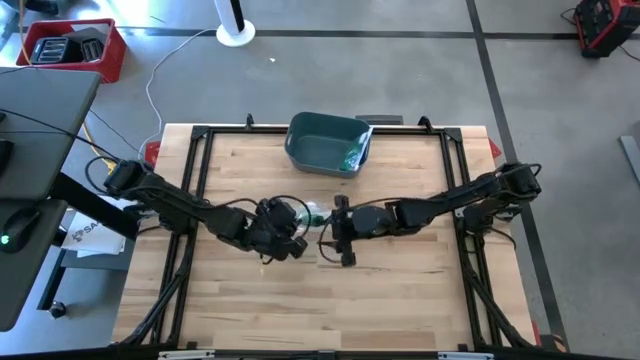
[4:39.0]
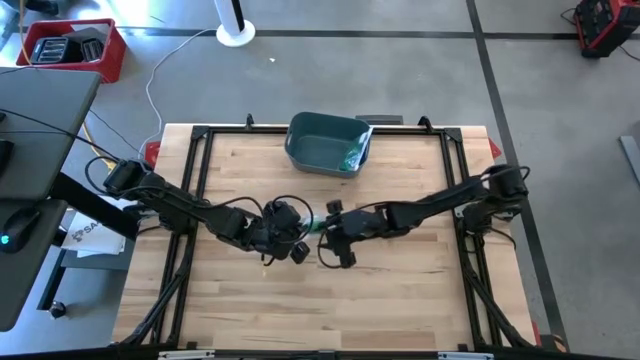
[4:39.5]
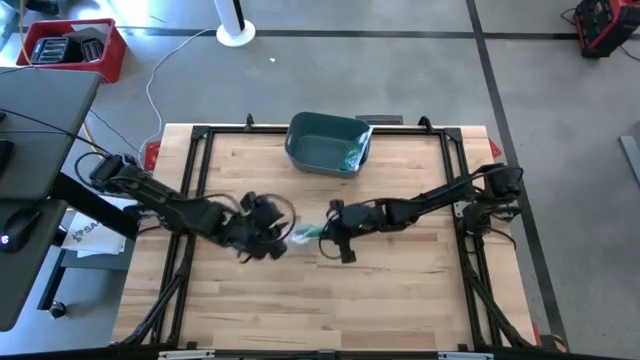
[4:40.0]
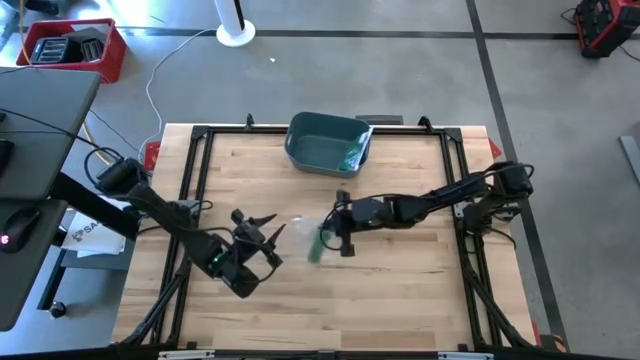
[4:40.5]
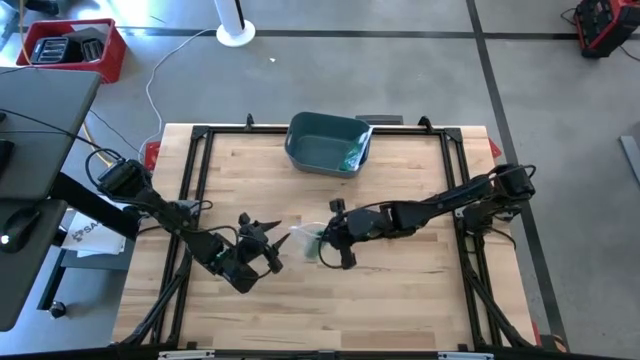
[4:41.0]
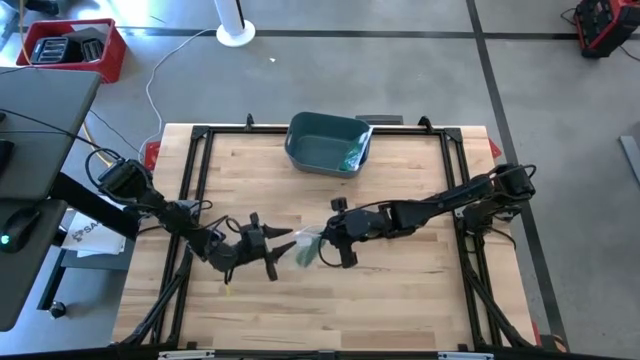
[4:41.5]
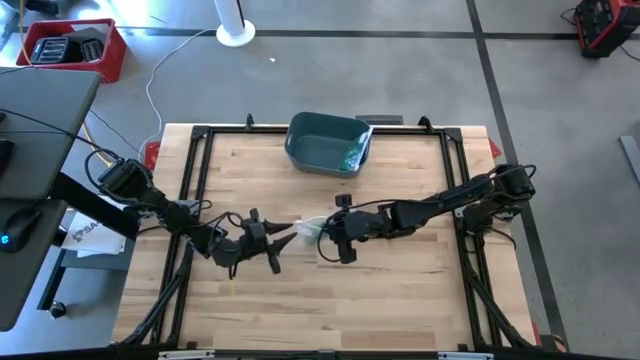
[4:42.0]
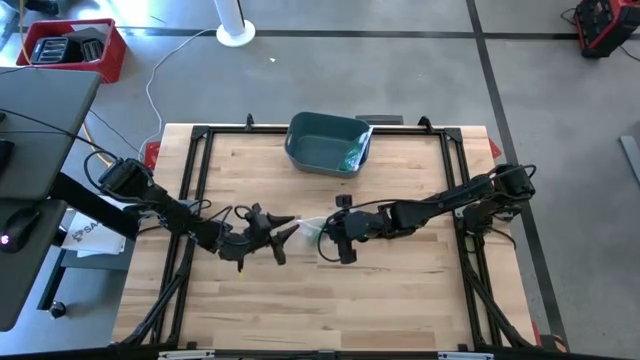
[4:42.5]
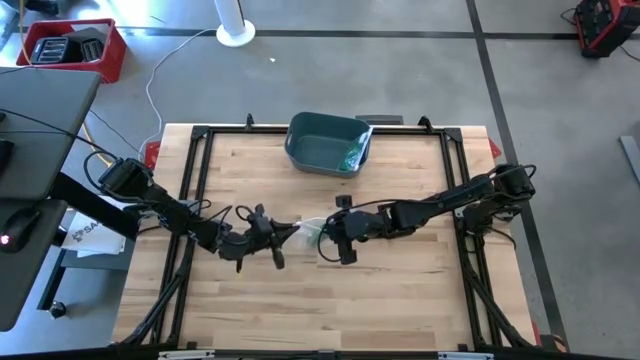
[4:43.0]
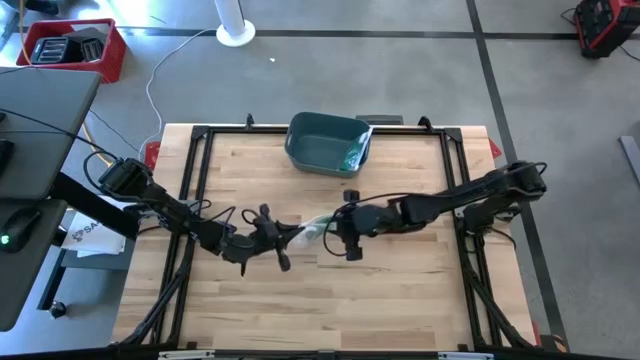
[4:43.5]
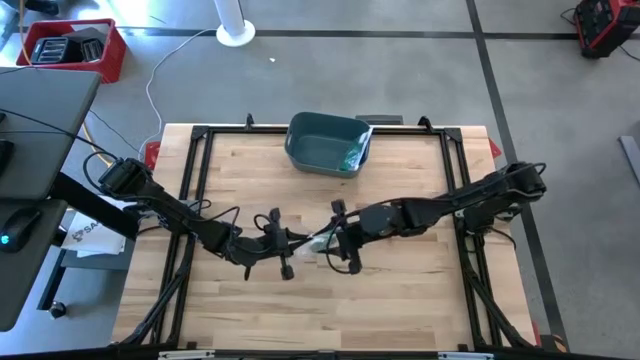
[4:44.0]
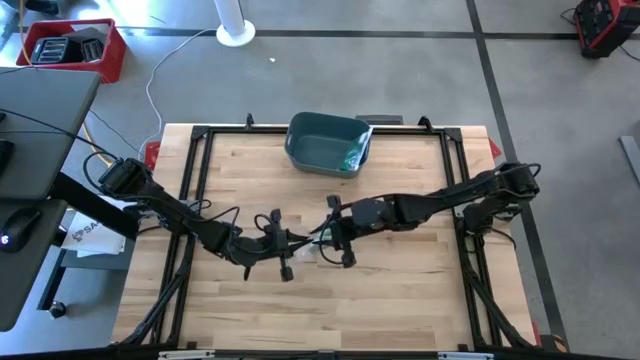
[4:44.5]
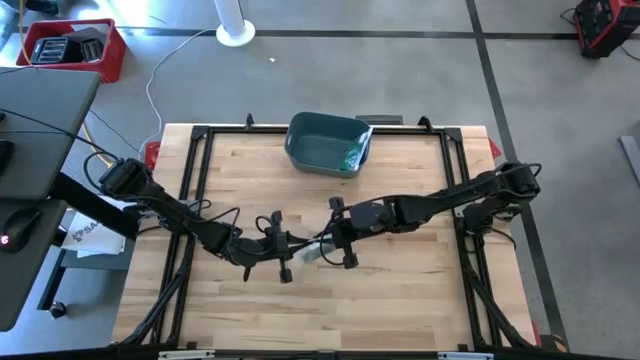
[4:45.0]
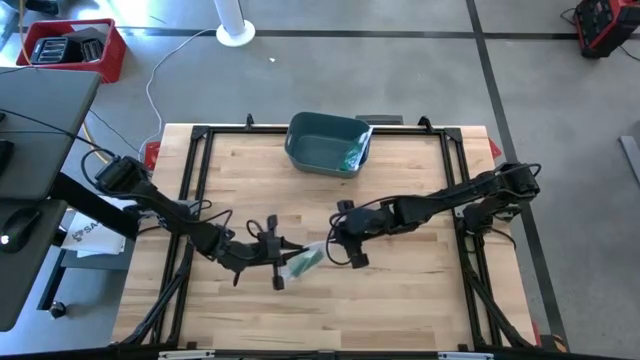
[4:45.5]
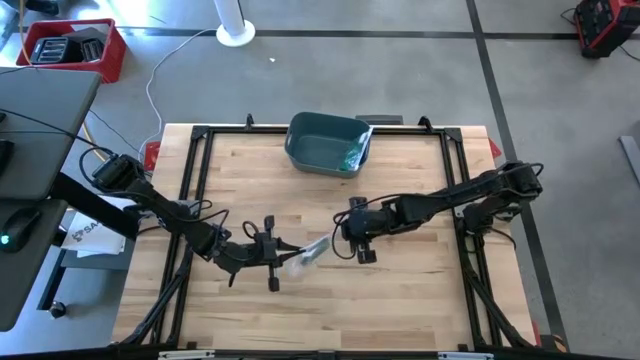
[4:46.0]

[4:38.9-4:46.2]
Task: Roll bandage
Close the transparent zip bag

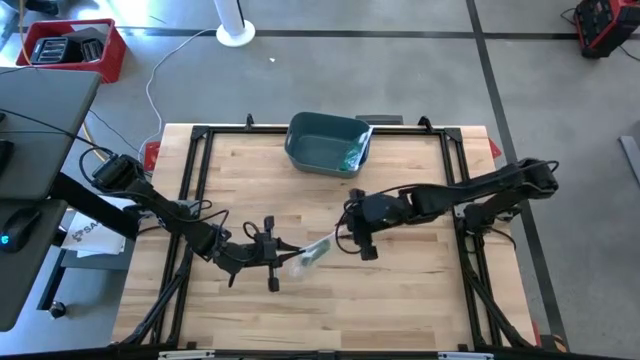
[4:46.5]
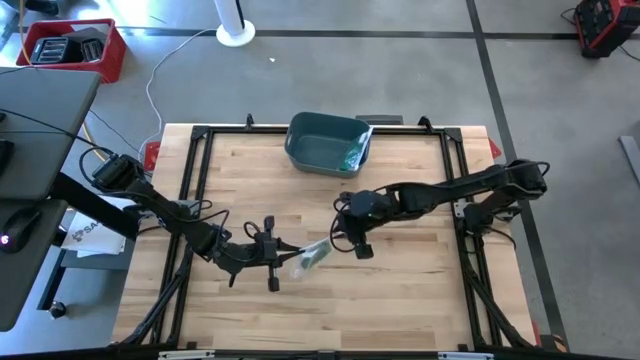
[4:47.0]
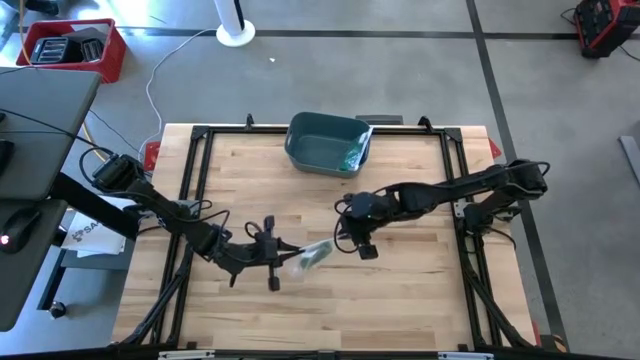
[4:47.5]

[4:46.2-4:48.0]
Close the transparent zip bag

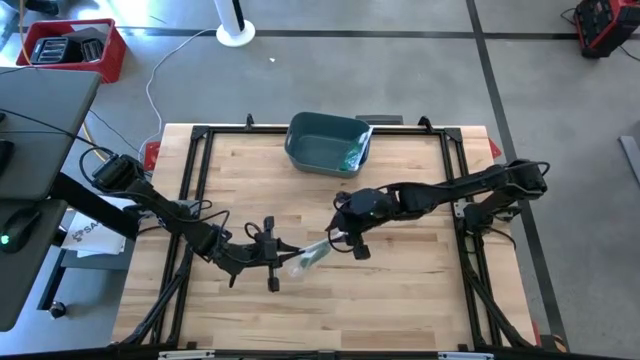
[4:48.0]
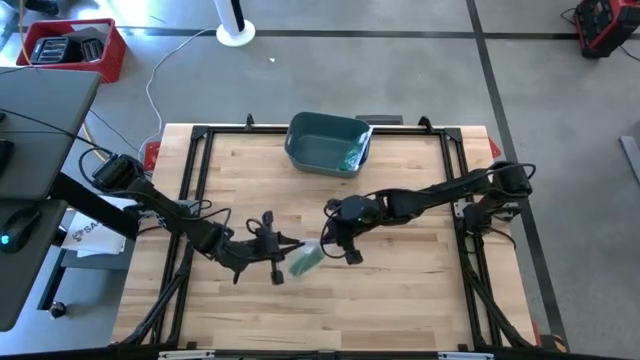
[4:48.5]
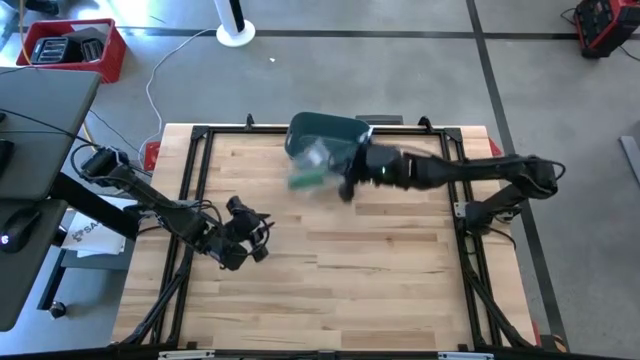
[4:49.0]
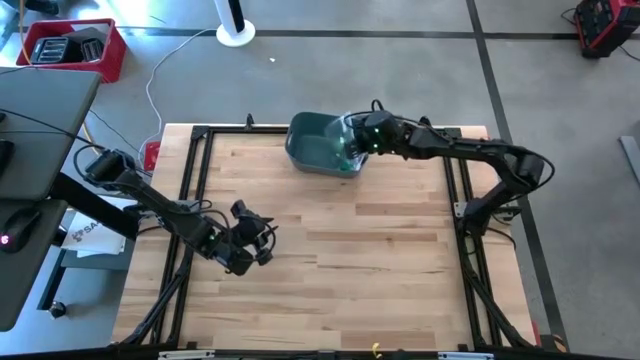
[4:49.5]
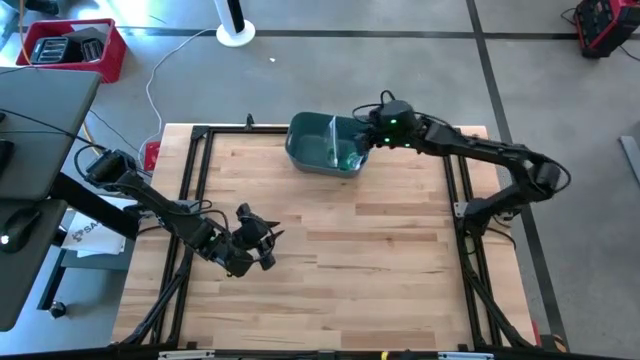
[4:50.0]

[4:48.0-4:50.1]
Put the transparent zip bag into the blue bin

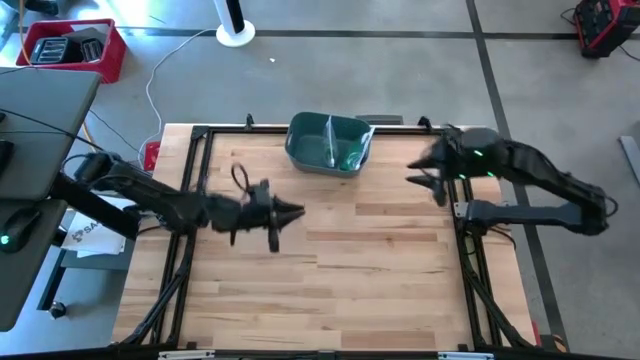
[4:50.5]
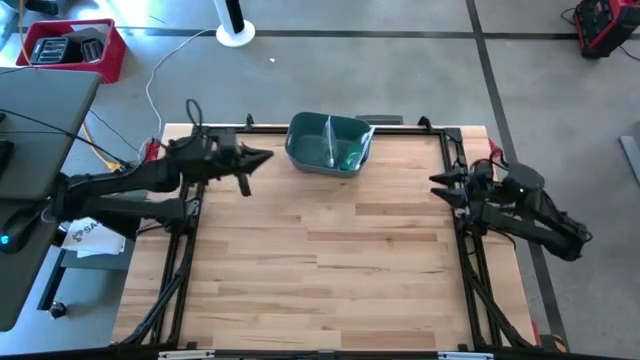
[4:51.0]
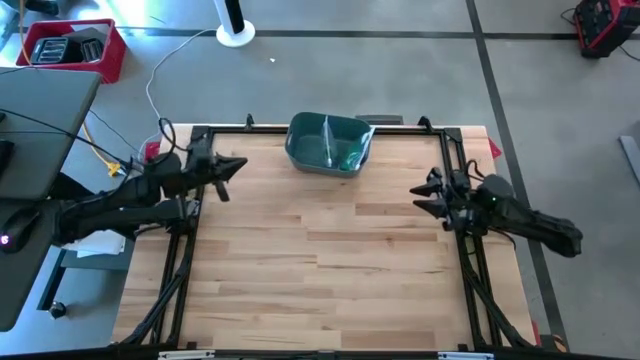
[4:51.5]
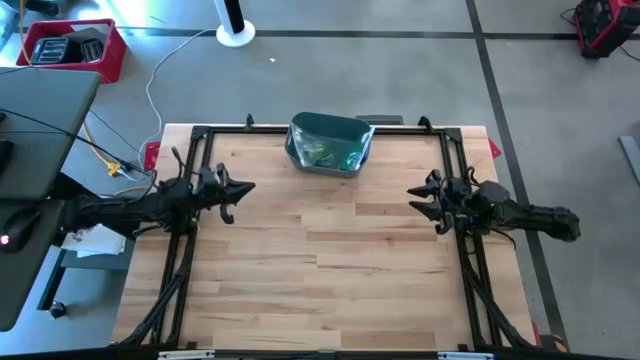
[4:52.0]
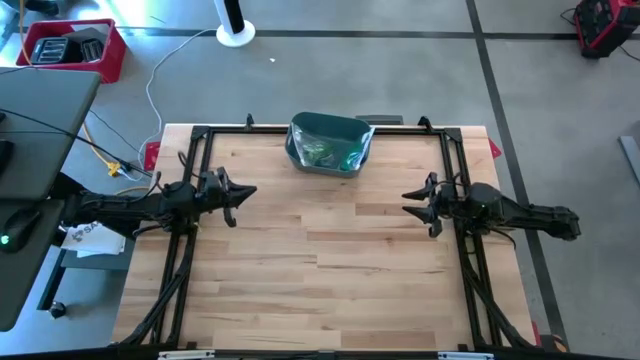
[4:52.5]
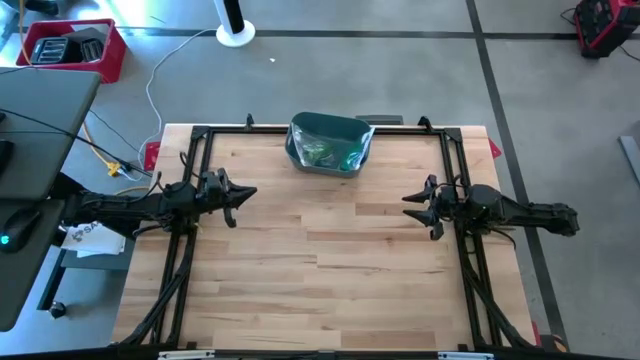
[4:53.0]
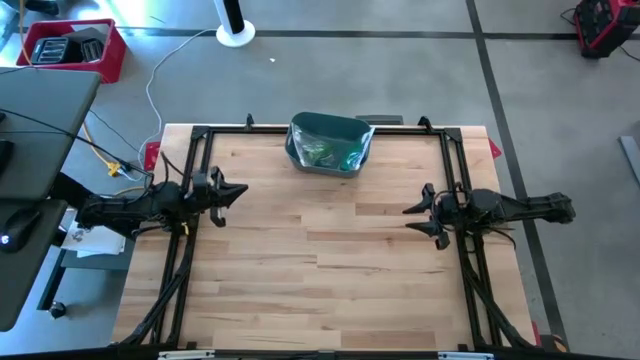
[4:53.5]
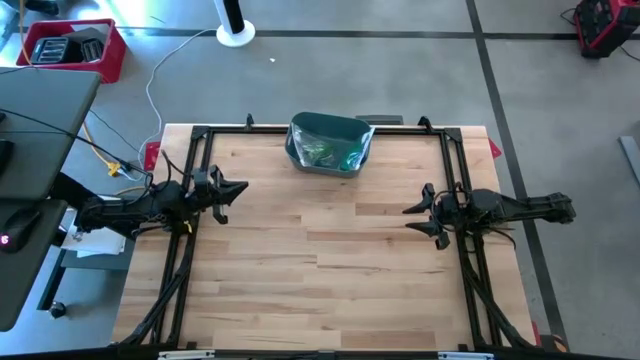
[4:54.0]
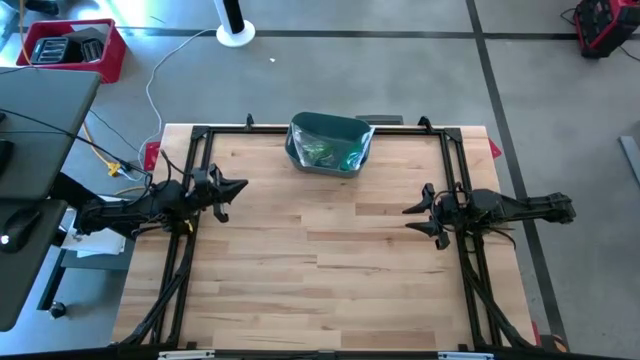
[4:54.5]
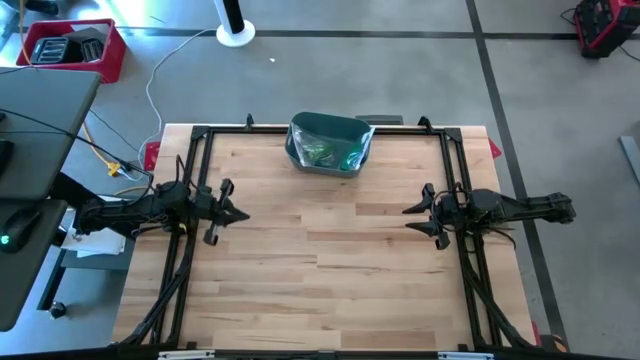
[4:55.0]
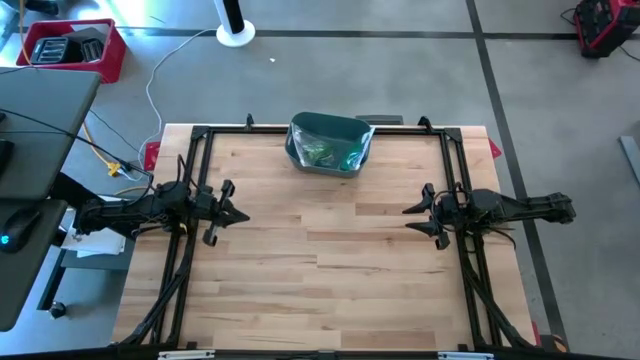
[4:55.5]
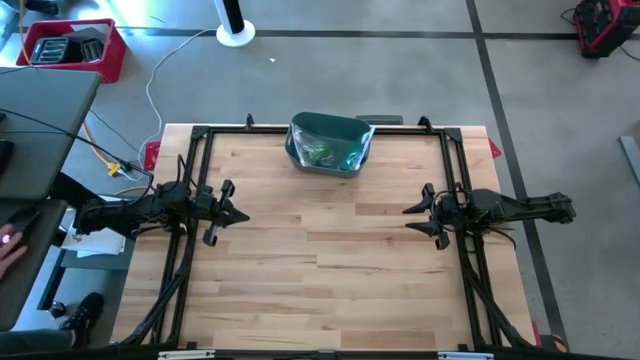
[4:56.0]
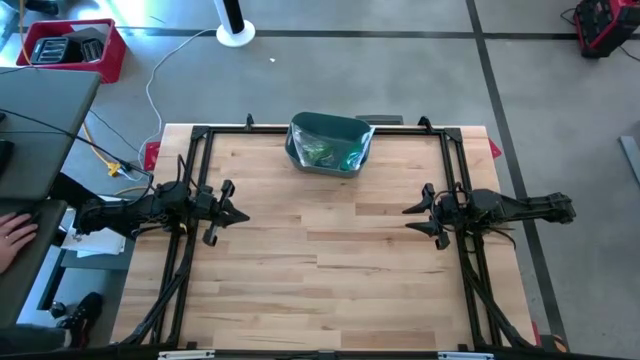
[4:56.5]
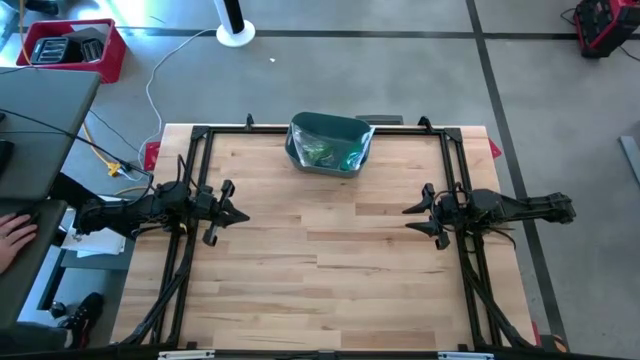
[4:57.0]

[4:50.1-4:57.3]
Return to Home Position
